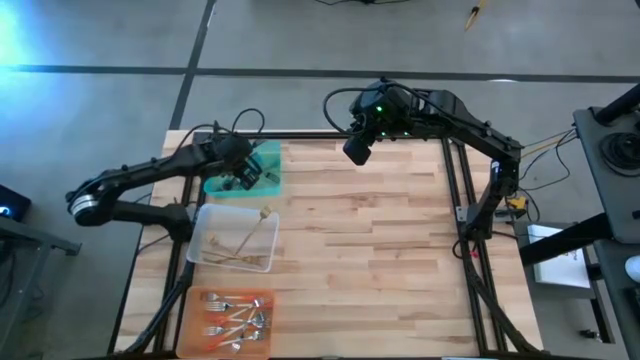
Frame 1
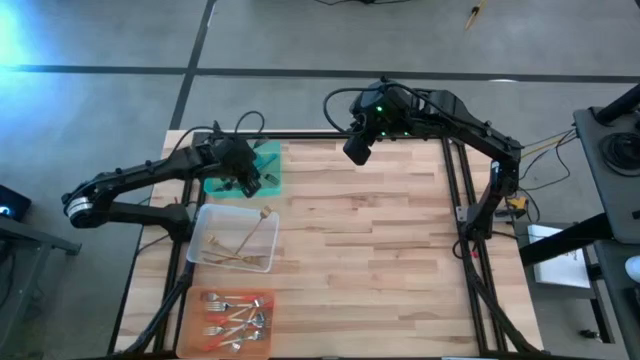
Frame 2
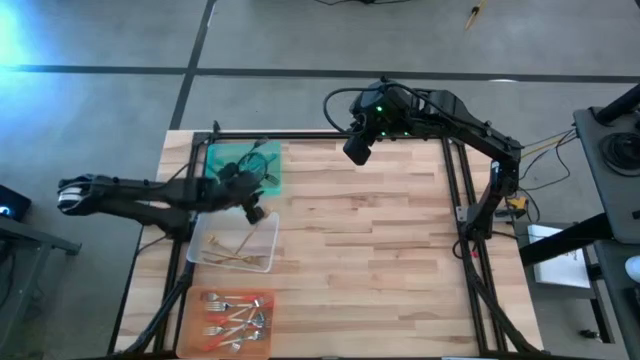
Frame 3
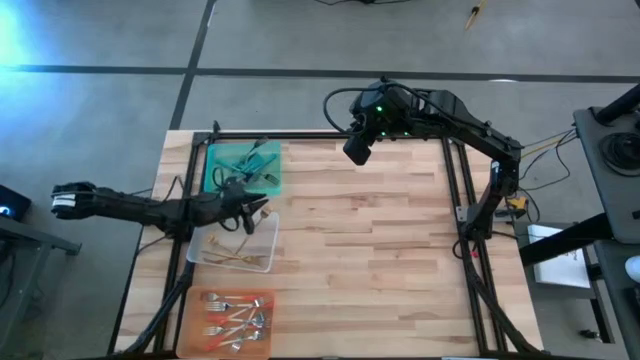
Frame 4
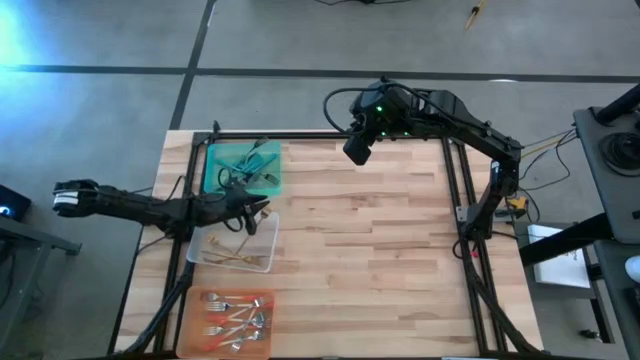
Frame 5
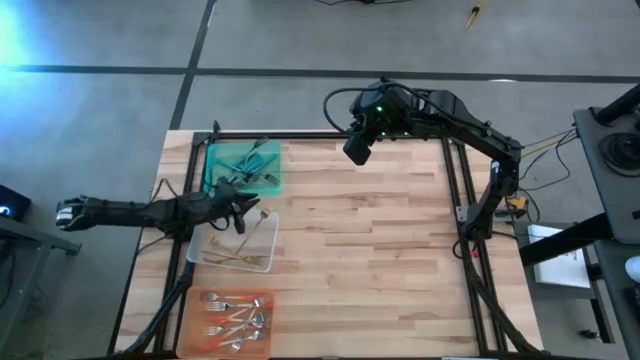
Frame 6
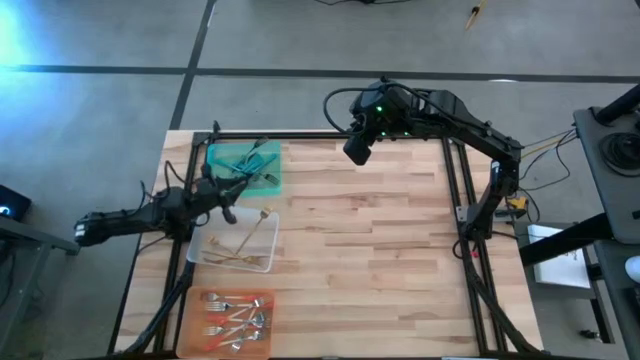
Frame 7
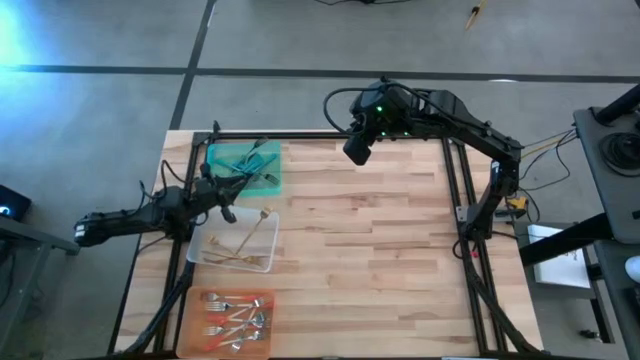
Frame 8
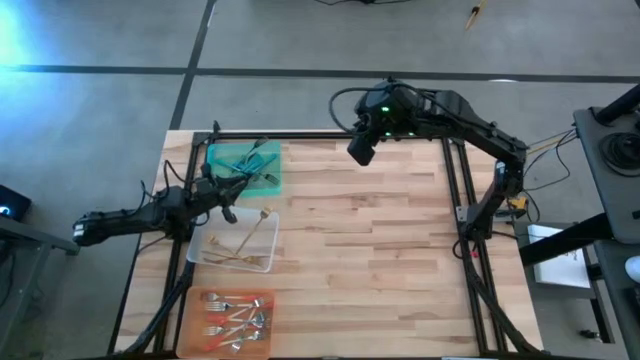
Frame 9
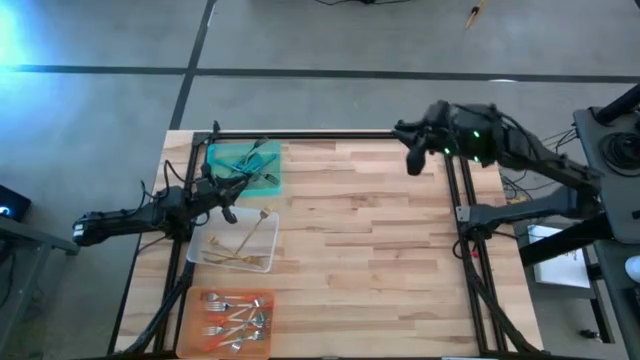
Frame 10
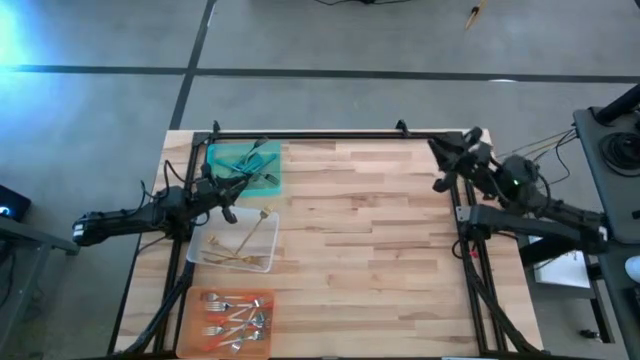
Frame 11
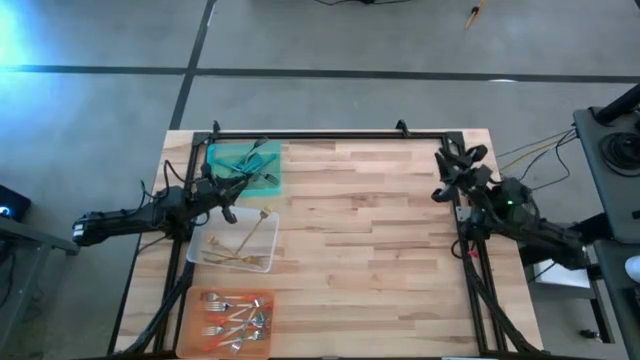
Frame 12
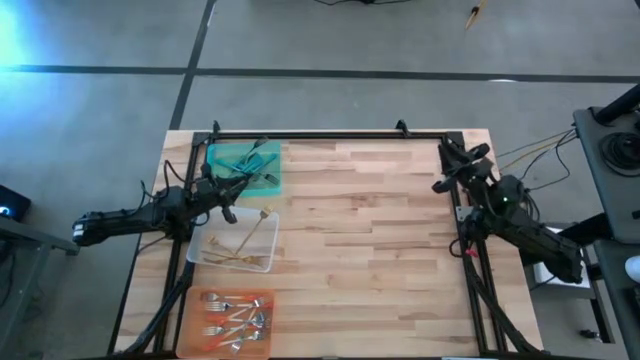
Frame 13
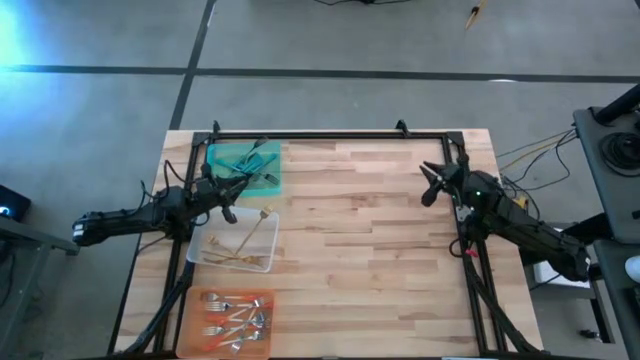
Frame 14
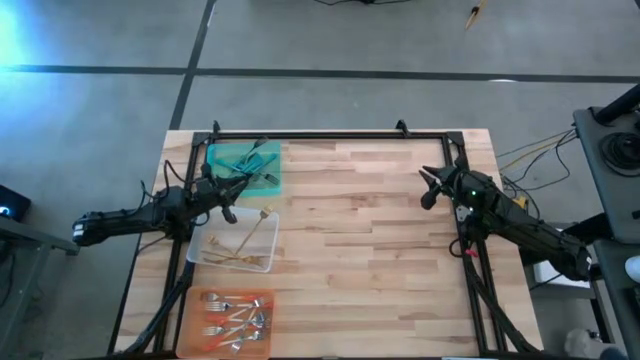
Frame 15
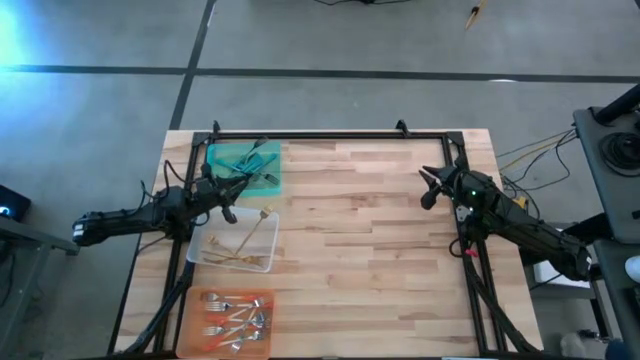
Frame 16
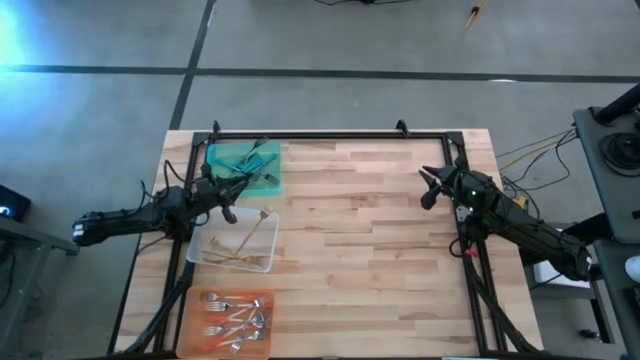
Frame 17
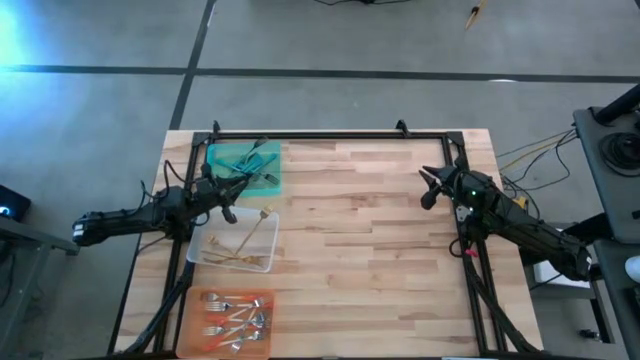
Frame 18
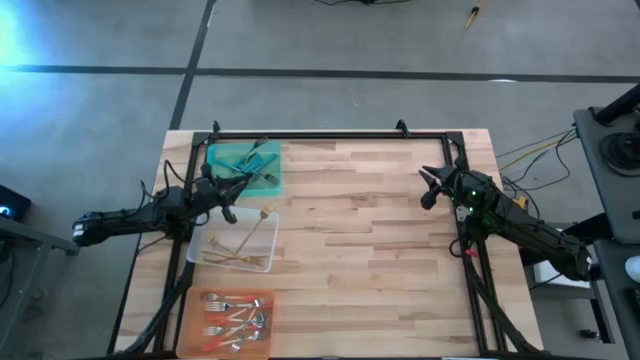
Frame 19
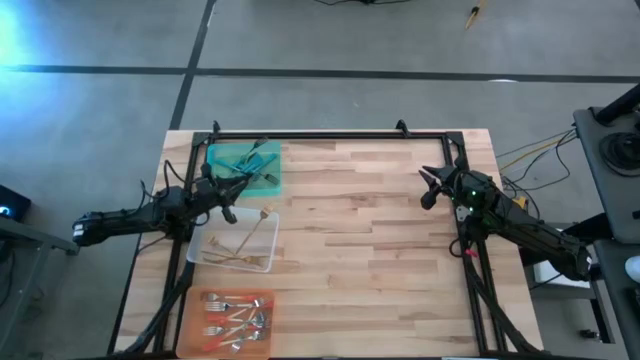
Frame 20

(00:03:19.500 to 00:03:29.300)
Task: Sort silverware by color (type)
Return to Home Position

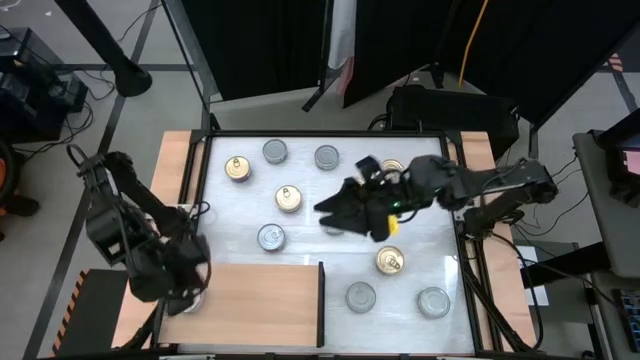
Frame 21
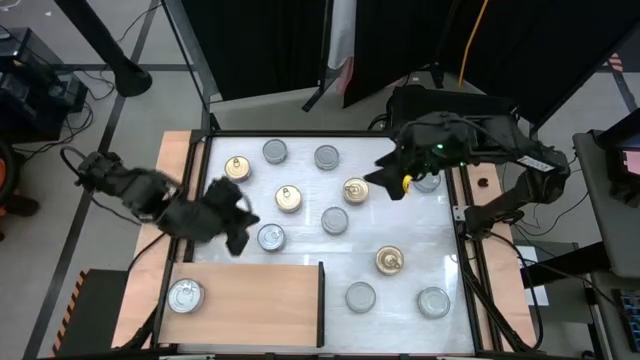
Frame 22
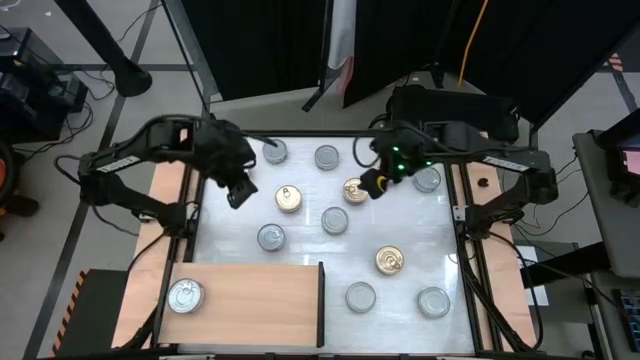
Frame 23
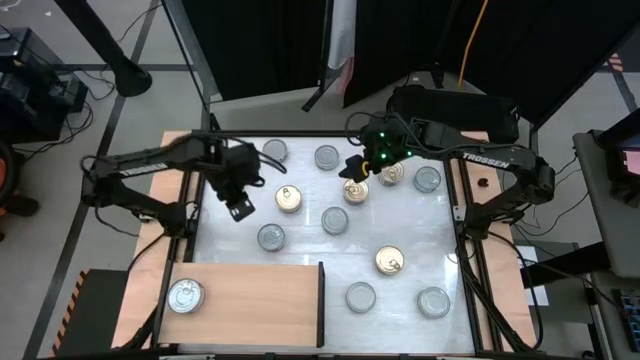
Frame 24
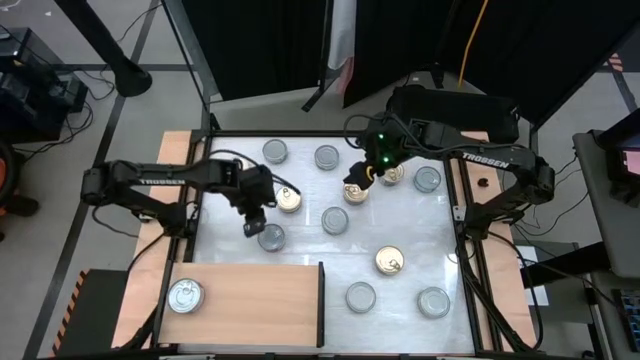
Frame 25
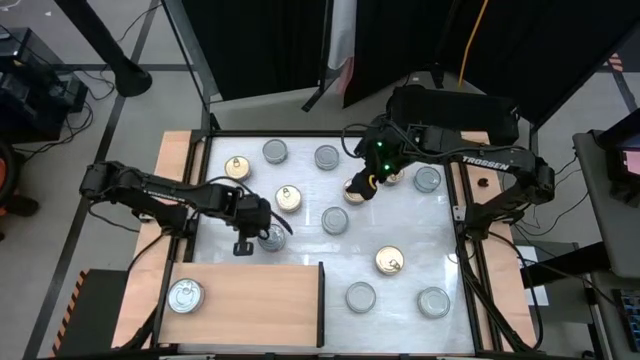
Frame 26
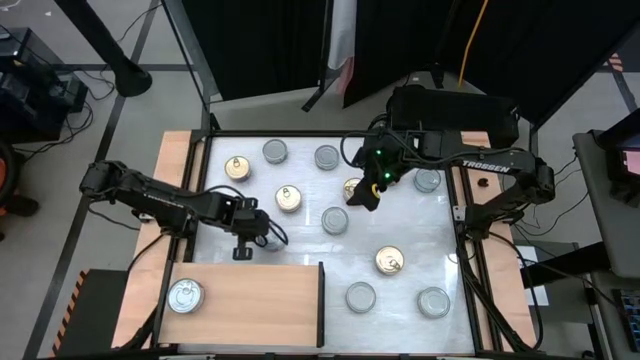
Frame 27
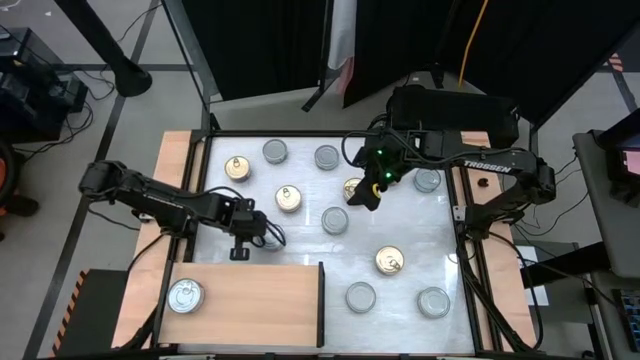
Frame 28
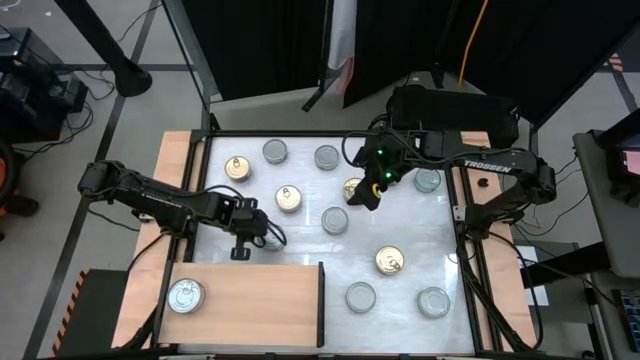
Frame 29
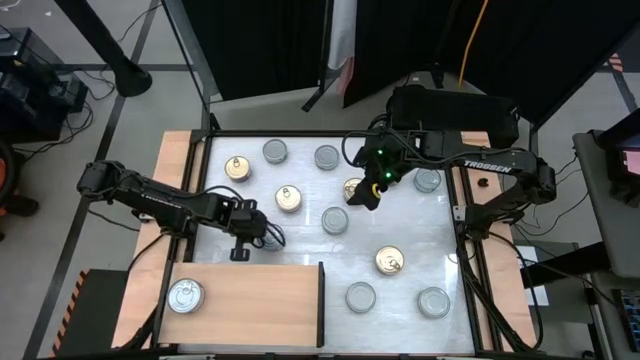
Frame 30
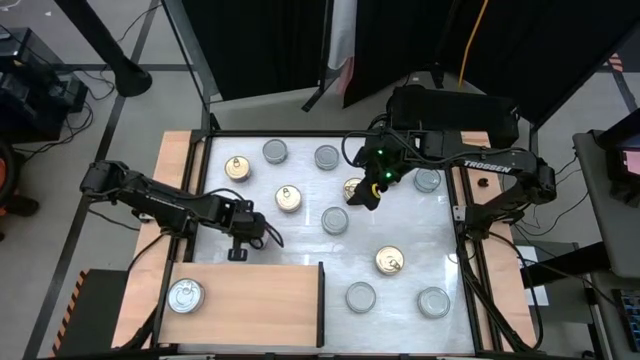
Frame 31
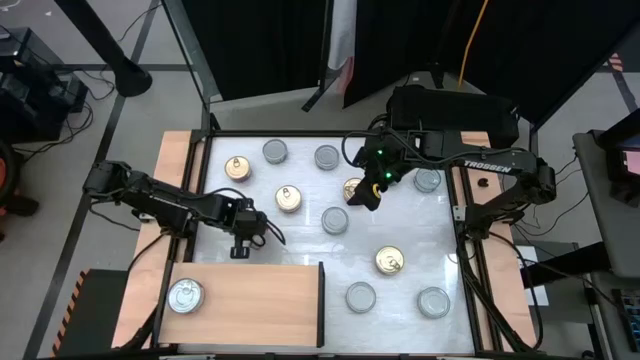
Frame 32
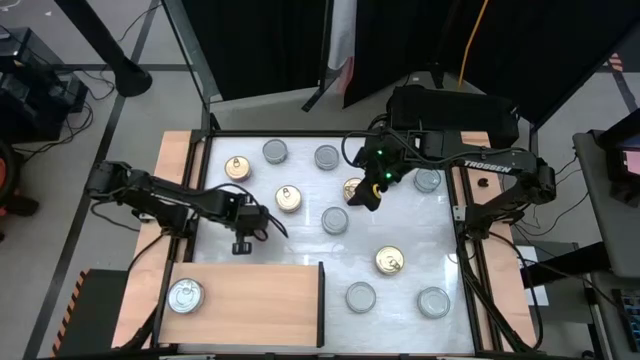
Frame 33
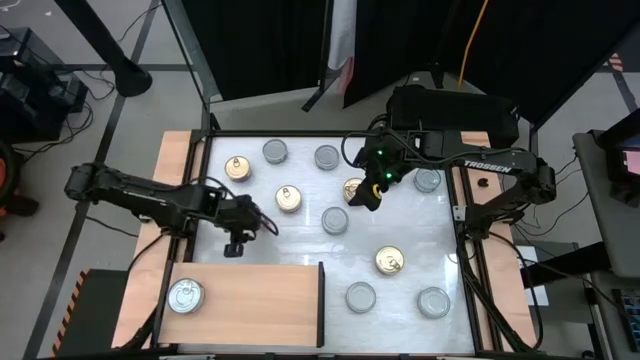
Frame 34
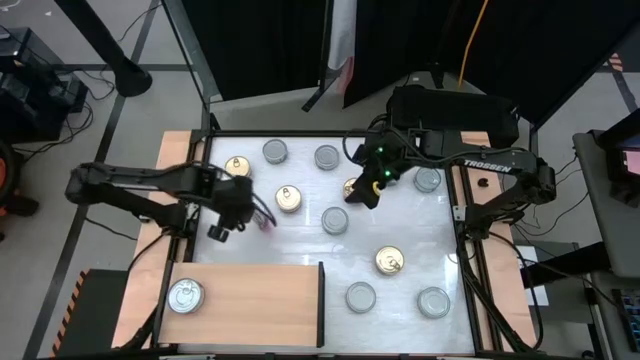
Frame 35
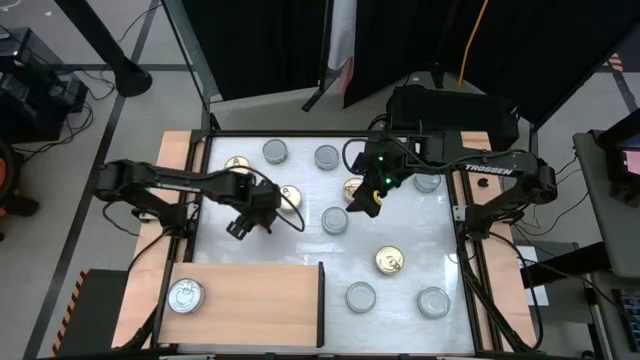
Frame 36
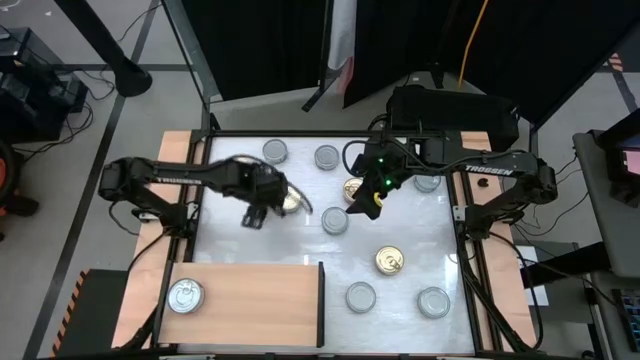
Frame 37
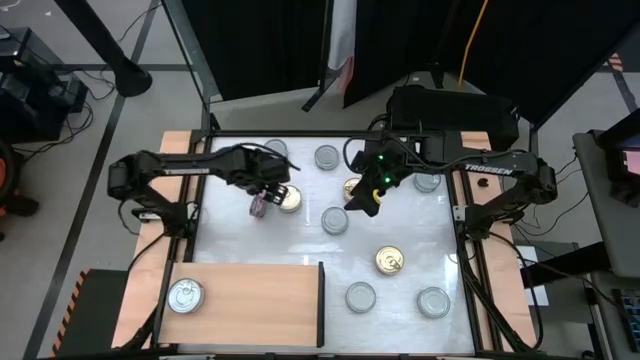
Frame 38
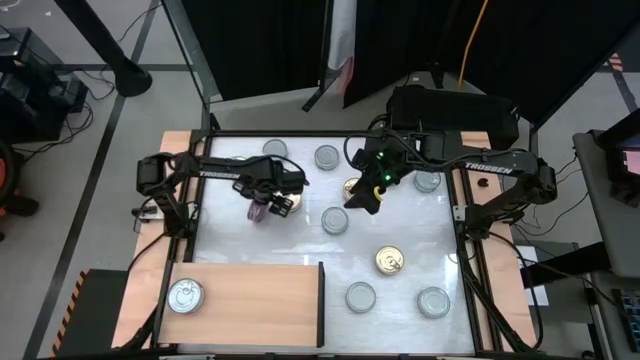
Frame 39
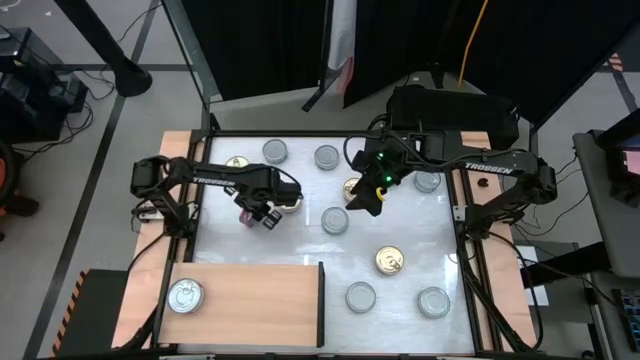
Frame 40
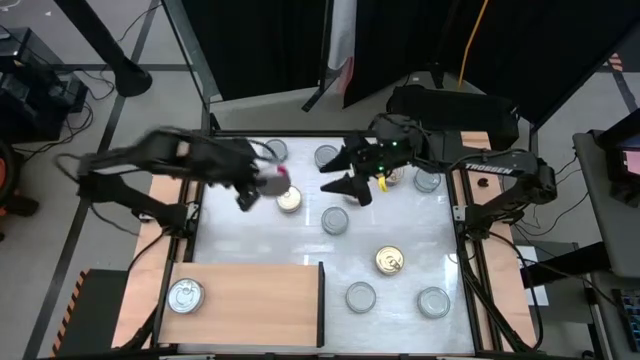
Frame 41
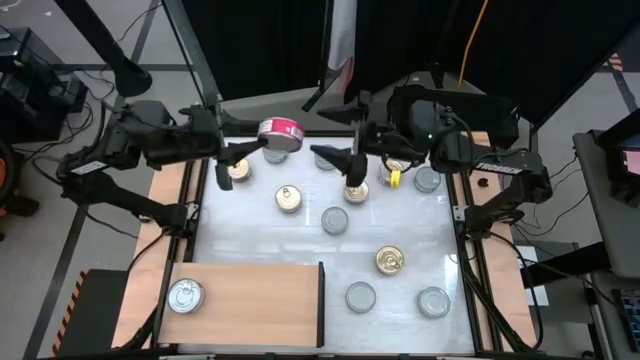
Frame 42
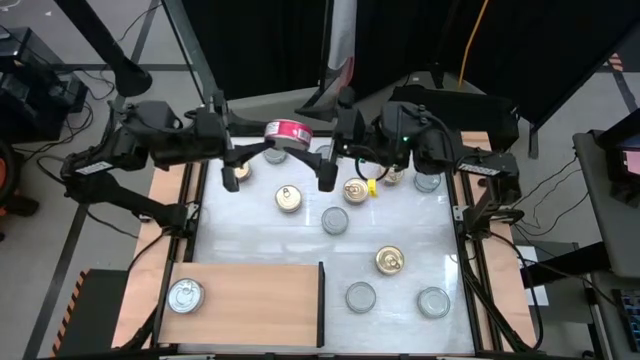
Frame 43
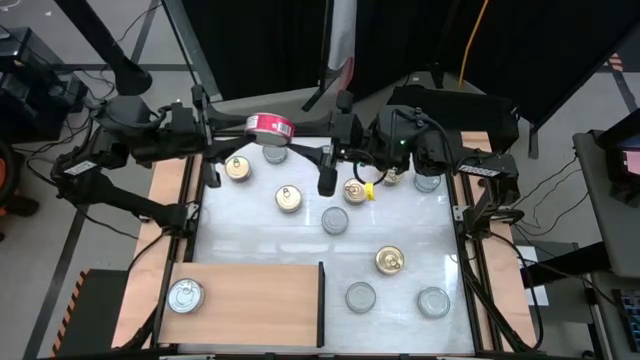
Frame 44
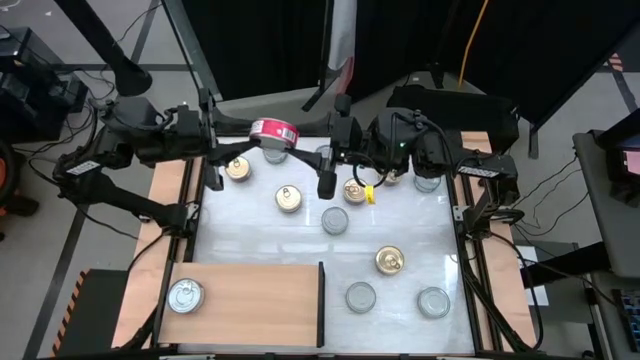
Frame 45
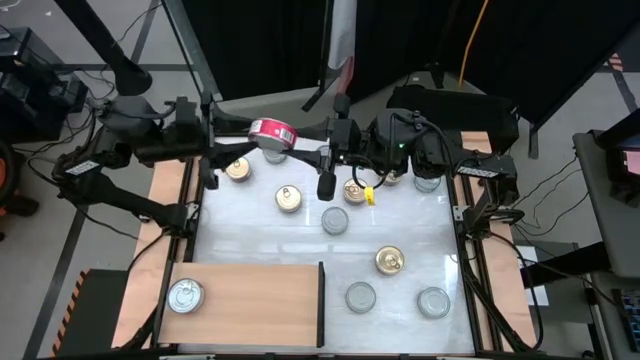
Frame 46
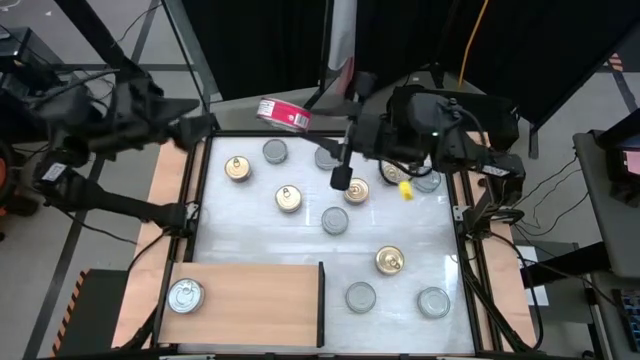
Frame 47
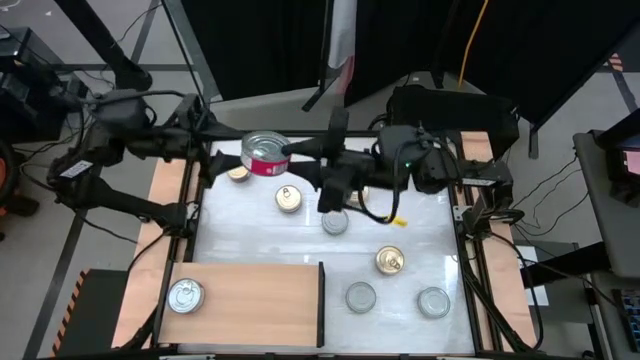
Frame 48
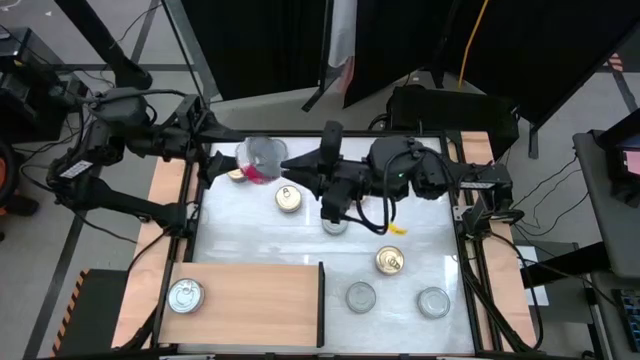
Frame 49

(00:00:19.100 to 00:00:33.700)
Task: Stack canned seafood by type on shelf
Stack the red tuna can on top of the other red tuna can on the shelf
